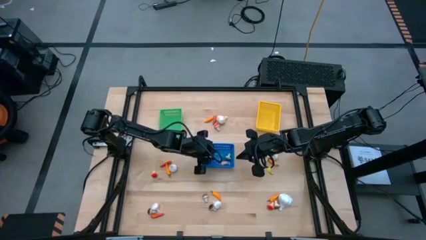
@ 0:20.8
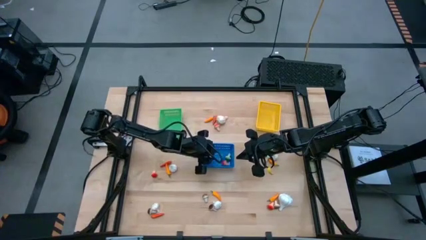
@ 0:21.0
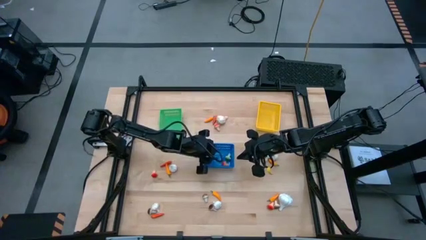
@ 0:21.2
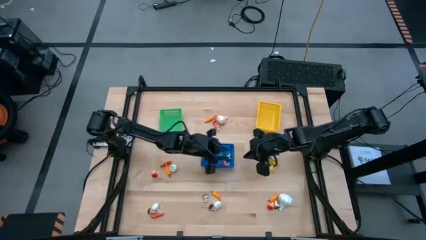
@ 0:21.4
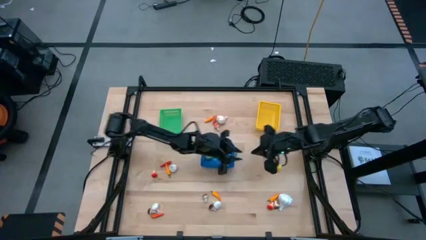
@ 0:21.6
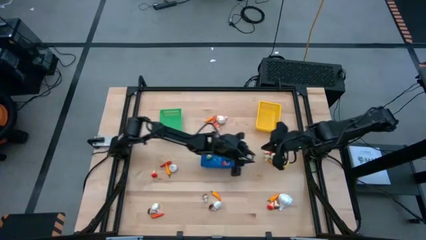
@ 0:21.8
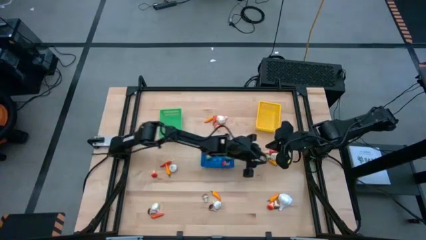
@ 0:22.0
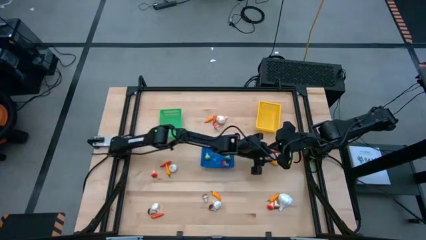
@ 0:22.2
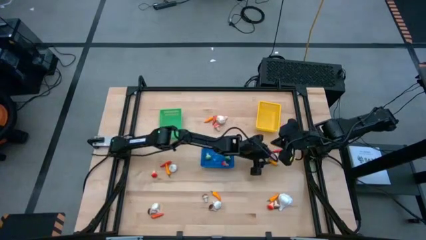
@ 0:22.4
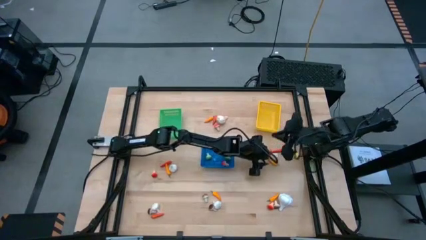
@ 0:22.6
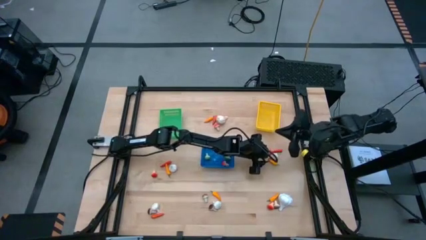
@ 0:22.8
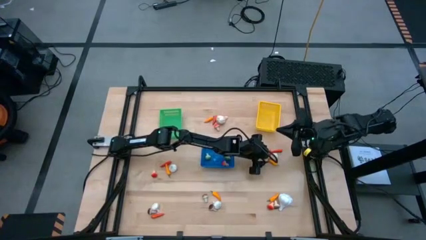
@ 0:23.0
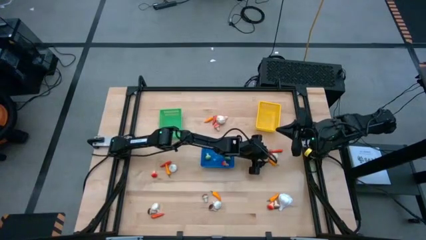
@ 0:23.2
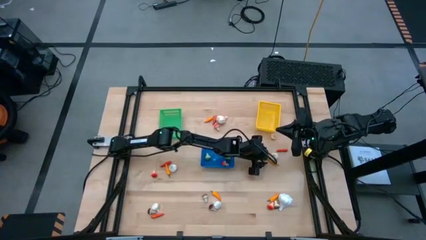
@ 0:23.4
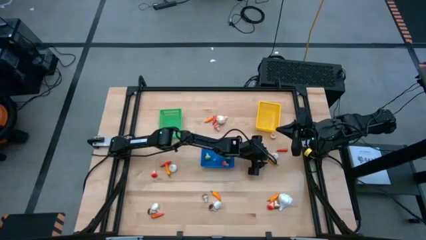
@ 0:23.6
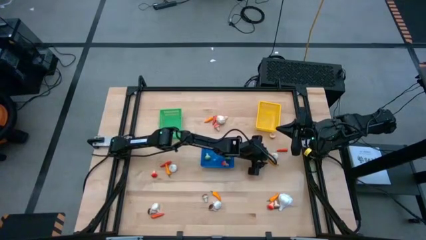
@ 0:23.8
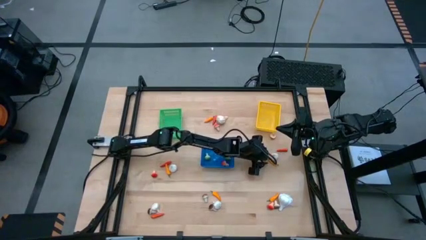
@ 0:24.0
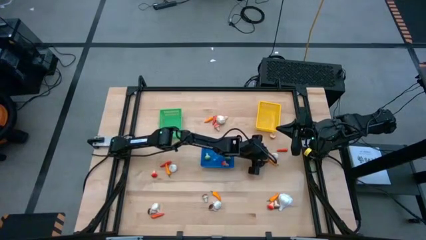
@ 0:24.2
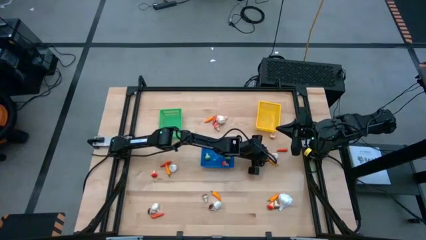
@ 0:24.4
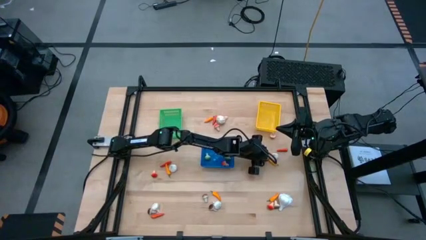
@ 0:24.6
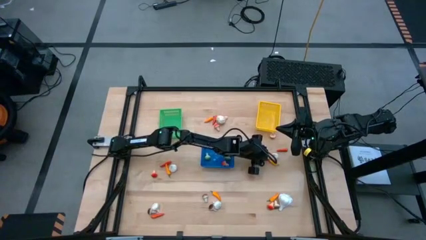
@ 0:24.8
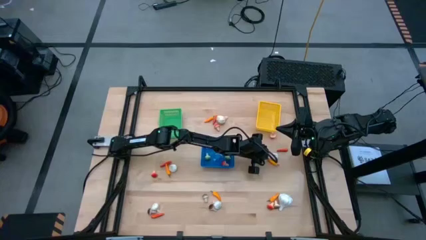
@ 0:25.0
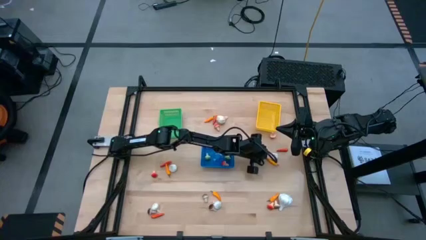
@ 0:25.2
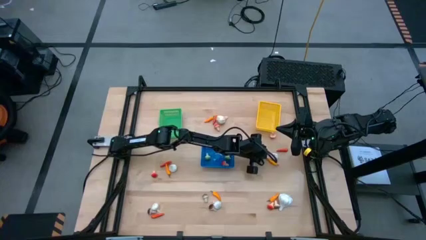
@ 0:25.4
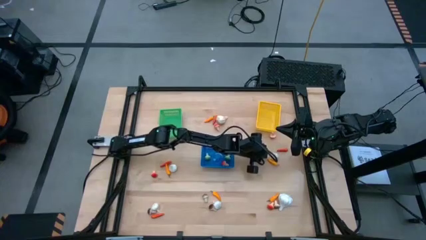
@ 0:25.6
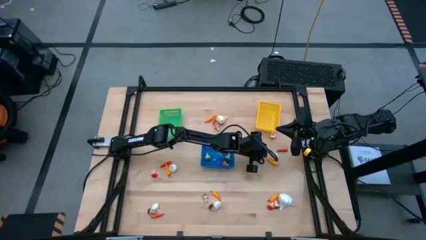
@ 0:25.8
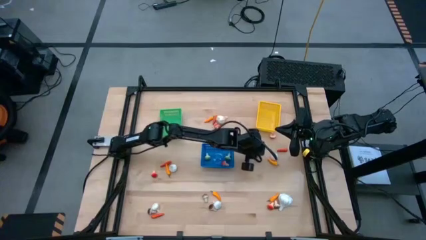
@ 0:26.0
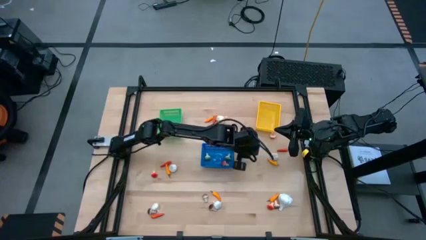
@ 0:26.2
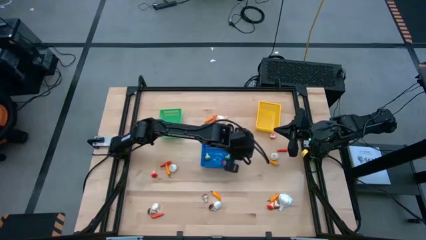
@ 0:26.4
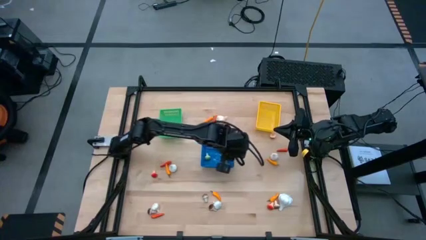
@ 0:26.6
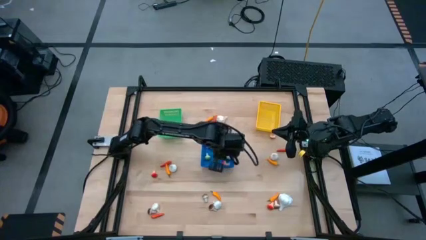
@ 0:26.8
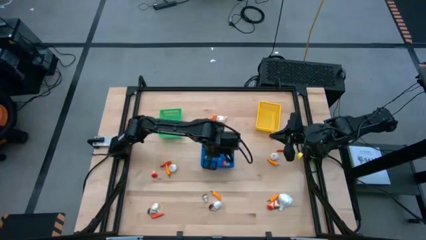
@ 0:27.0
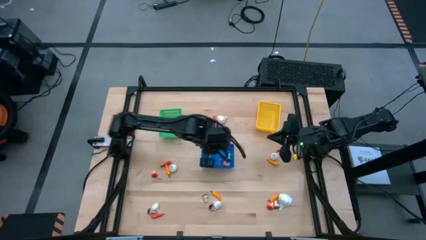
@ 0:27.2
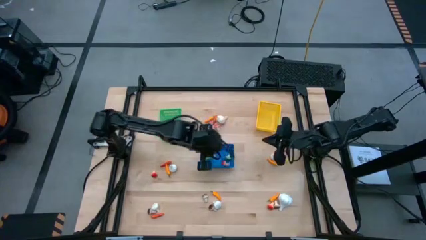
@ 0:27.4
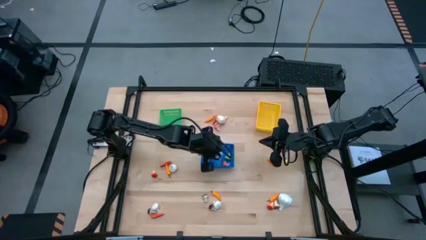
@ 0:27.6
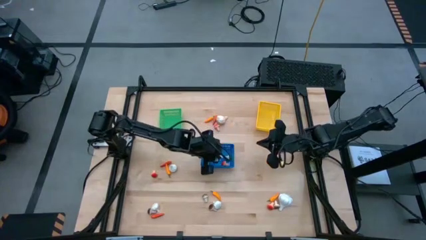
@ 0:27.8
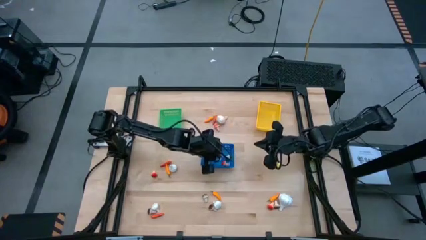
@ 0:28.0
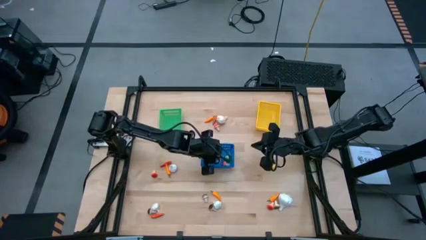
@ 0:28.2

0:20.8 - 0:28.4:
Task: Sort produce into baskets
Put the green mushroom into the blue bin

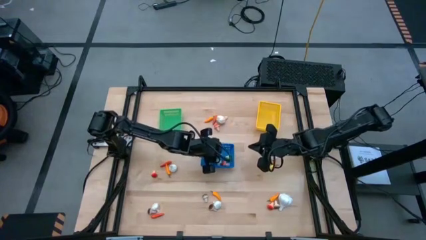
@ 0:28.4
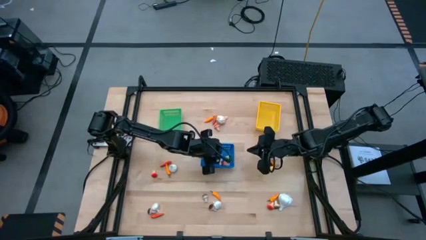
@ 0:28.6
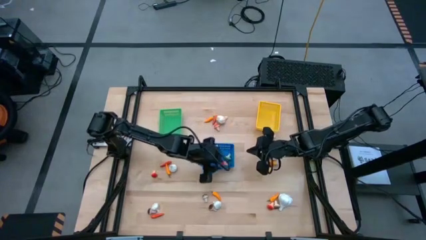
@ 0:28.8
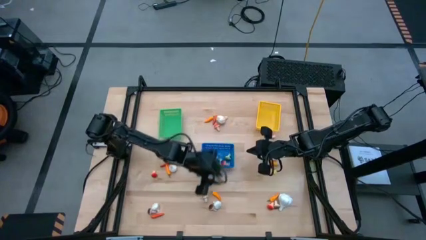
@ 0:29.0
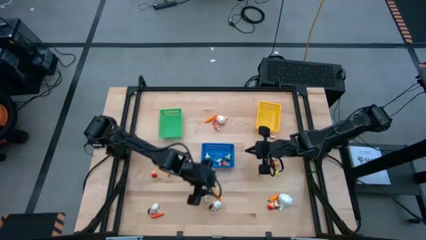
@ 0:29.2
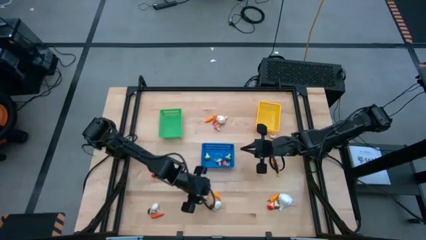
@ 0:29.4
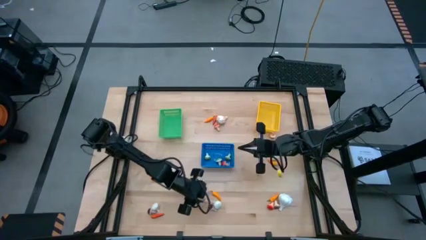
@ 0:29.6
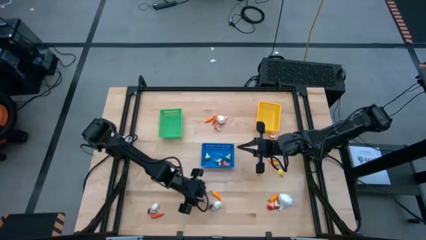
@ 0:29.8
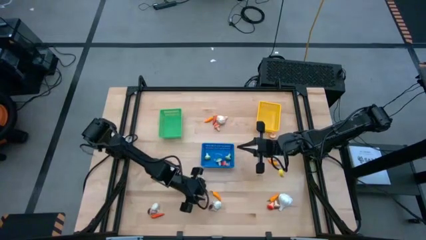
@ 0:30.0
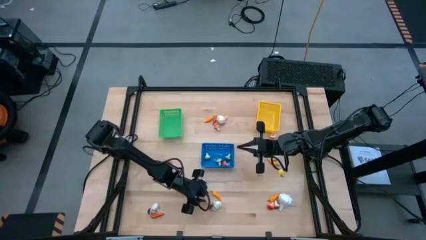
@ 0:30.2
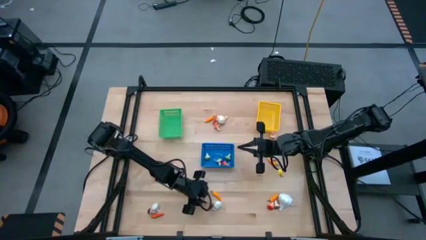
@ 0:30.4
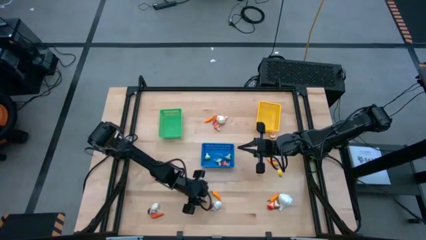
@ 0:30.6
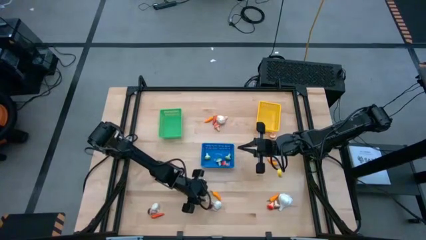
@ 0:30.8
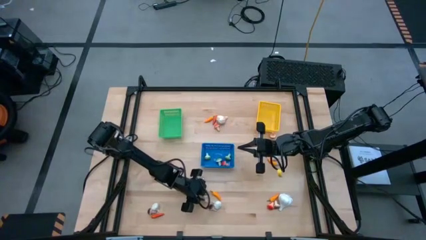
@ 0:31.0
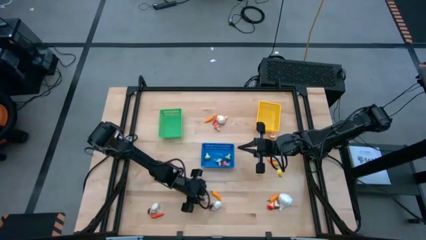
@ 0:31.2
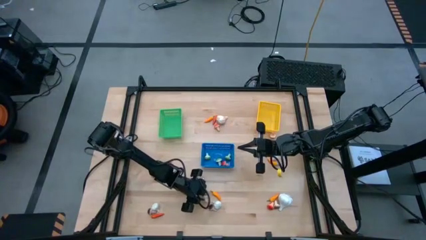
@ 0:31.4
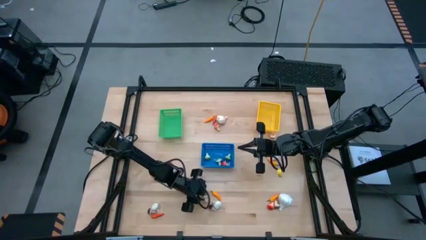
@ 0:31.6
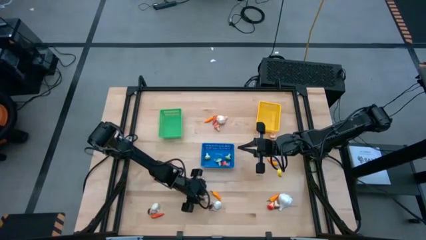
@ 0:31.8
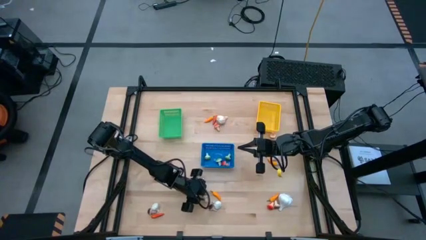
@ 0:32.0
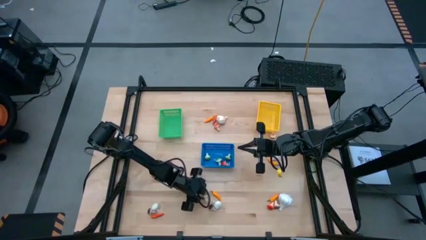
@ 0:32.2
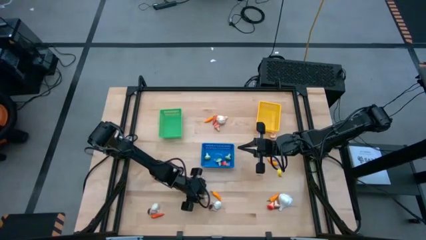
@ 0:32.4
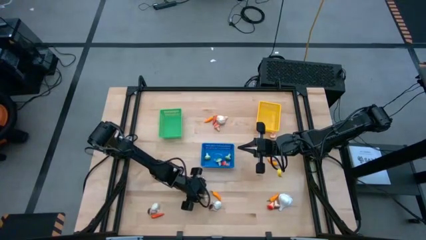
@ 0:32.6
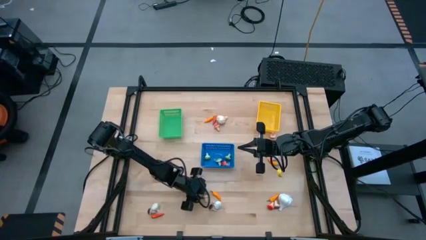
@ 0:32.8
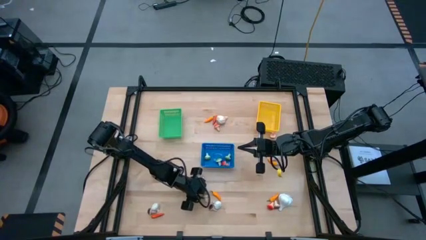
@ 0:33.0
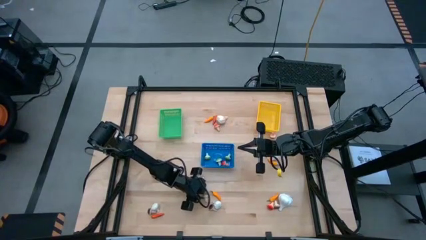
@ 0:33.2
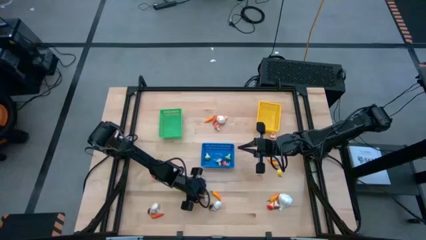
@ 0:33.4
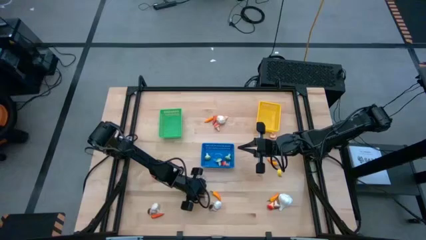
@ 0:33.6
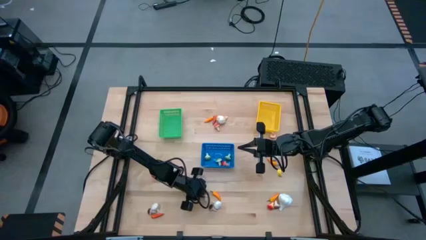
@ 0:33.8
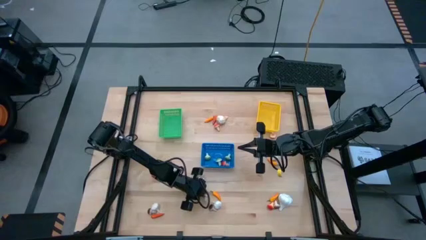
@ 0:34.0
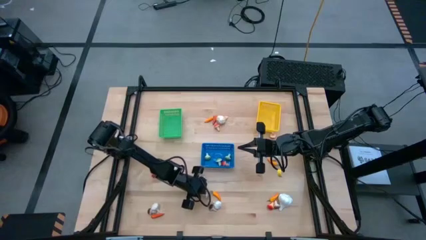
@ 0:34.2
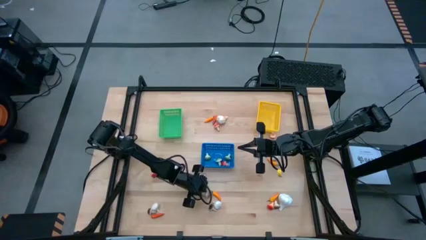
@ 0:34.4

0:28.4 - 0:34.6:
Put the brown mushroom into the blue bin

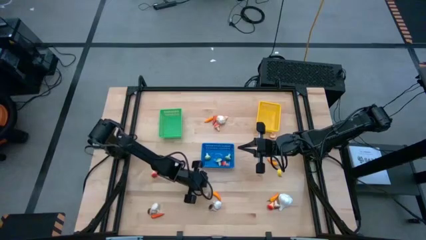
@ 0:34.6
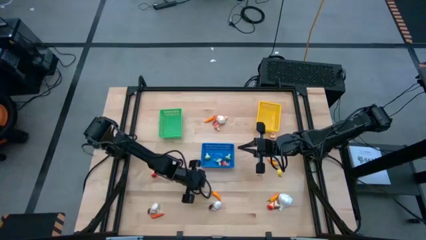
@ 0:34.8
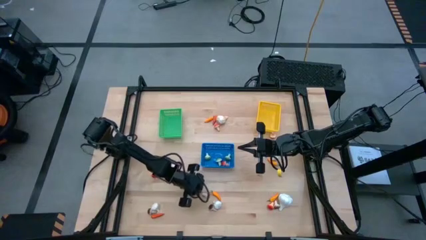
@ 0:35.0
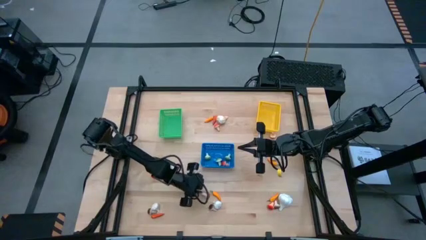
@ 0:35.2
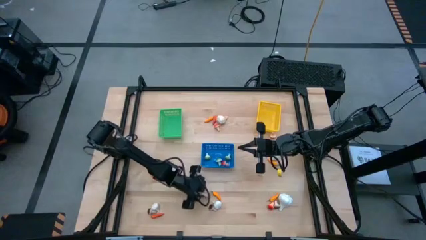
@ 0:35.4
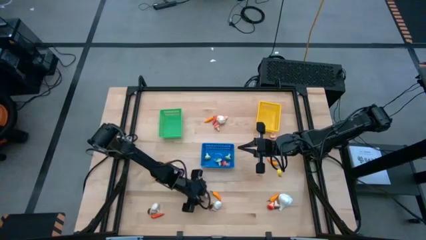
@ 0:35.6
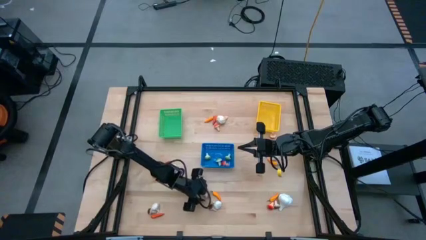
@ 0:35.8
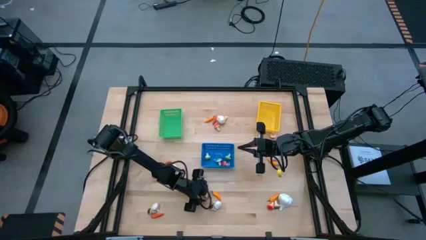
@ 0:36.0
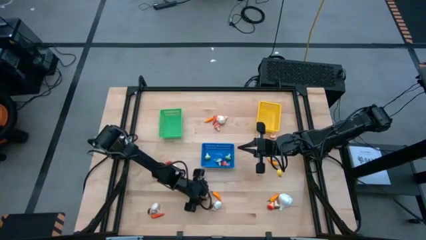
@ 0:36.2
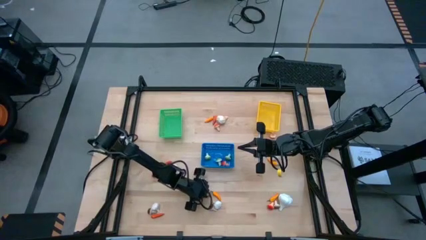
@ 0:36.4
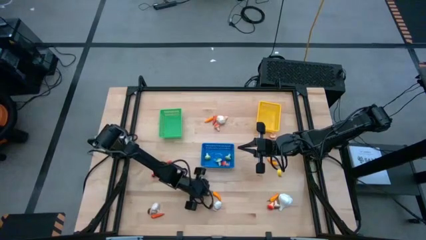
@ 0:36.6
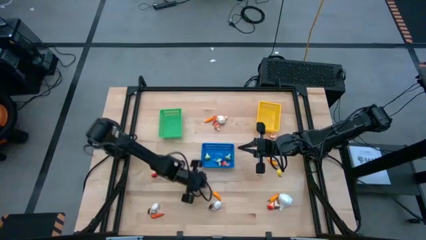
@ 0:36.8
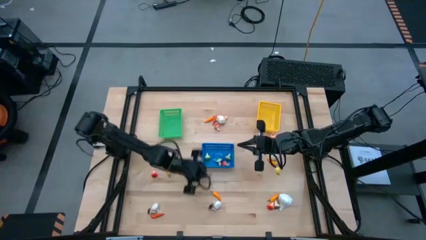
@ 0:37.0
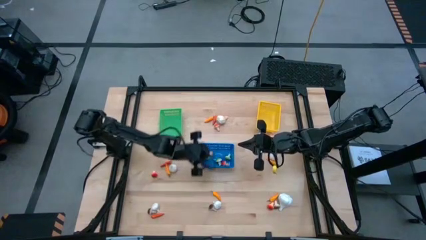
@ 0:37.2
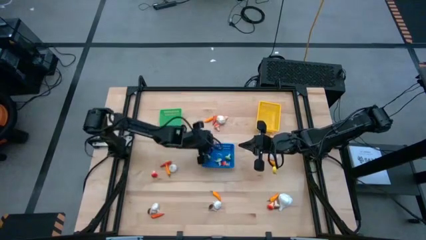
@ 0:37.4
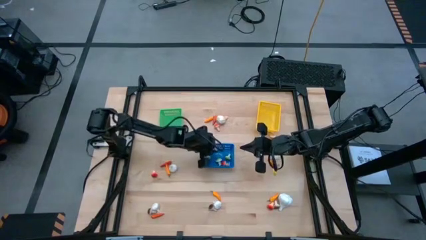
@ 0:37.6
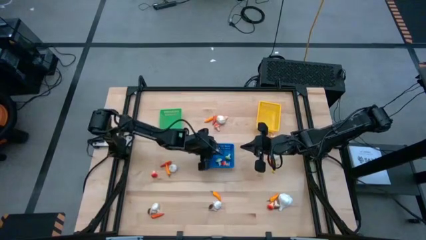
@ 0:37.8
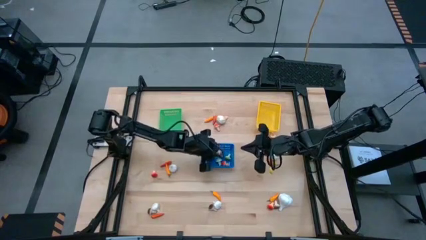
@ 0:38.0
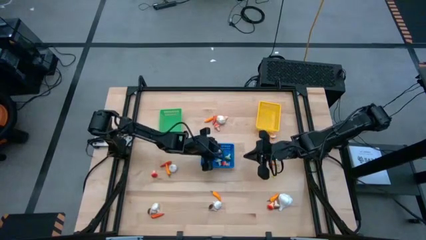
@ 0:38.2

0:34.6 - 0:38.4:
Put the brown mushroom into the blue bin
